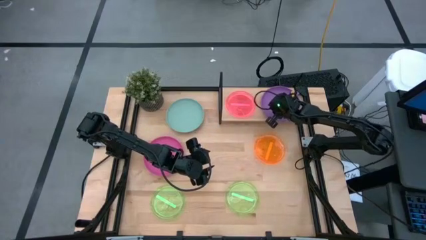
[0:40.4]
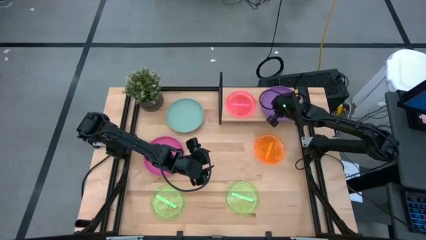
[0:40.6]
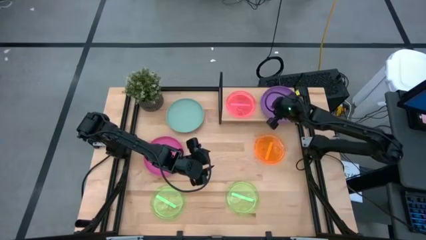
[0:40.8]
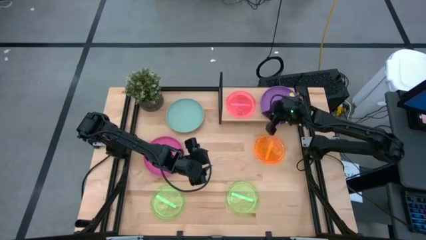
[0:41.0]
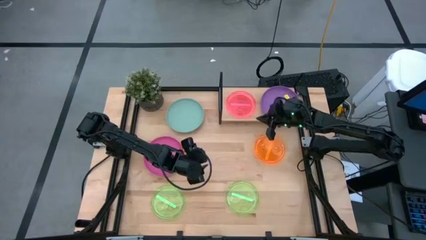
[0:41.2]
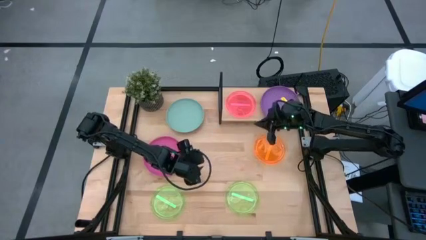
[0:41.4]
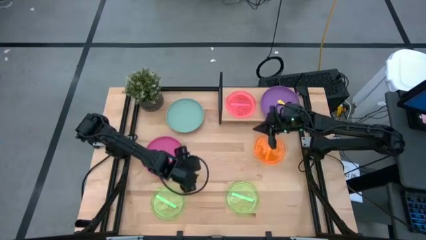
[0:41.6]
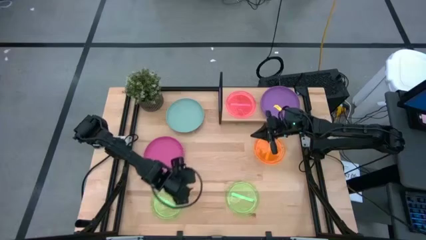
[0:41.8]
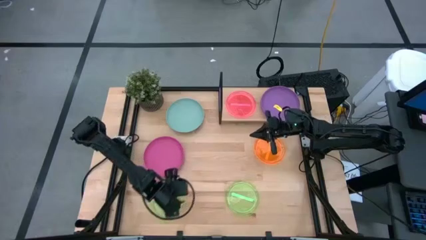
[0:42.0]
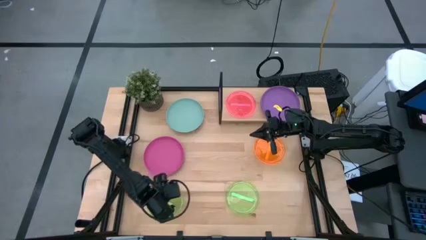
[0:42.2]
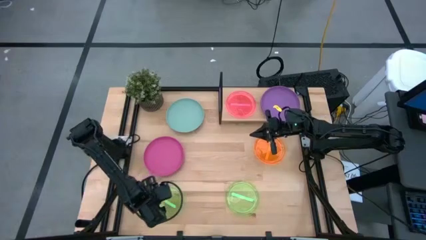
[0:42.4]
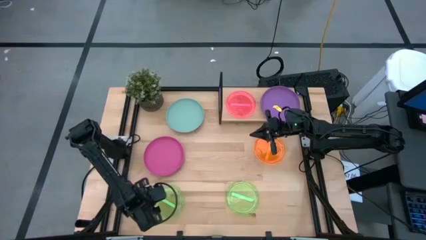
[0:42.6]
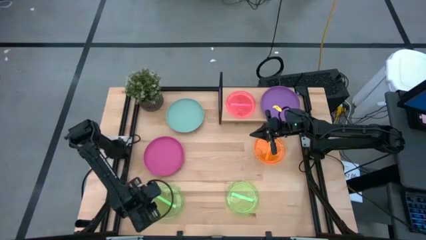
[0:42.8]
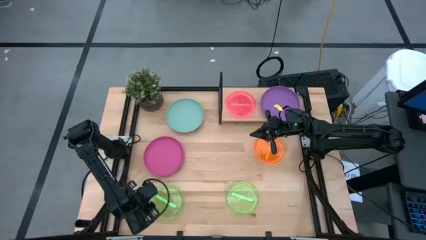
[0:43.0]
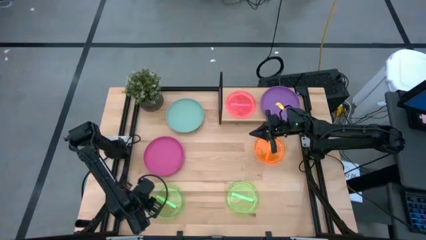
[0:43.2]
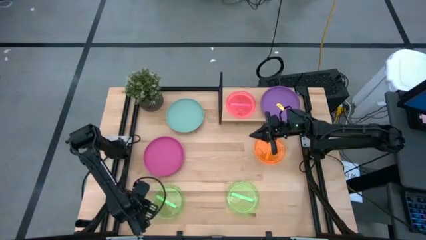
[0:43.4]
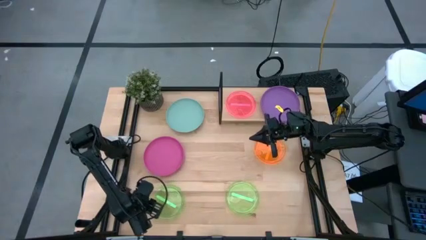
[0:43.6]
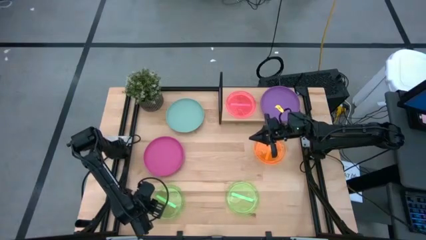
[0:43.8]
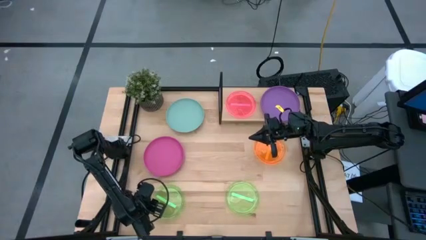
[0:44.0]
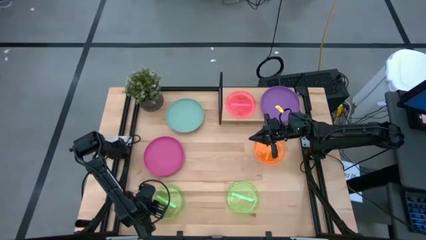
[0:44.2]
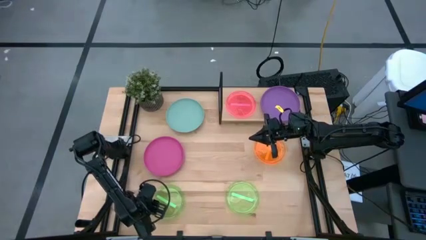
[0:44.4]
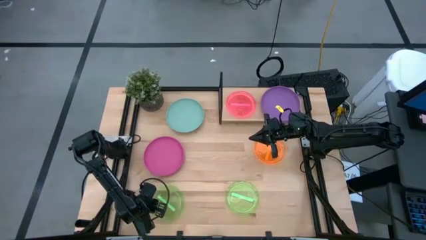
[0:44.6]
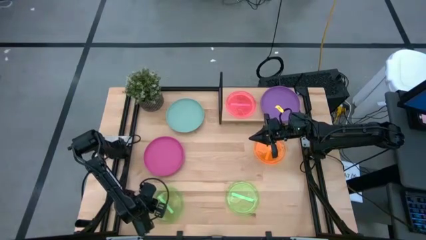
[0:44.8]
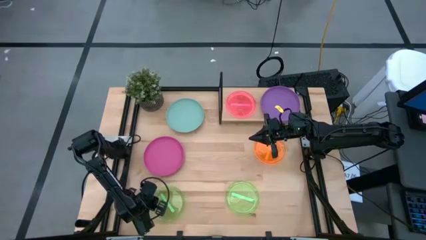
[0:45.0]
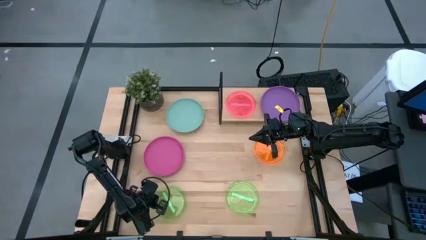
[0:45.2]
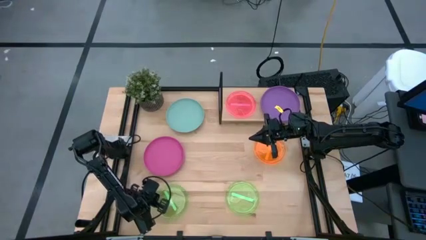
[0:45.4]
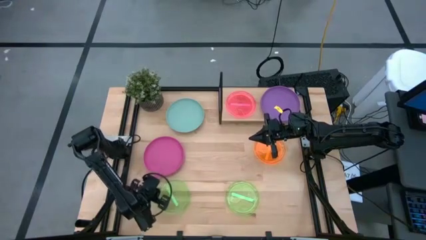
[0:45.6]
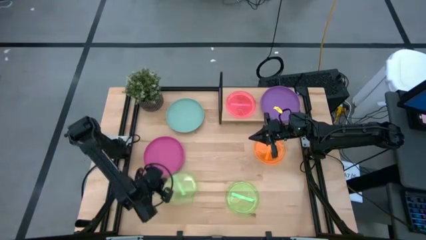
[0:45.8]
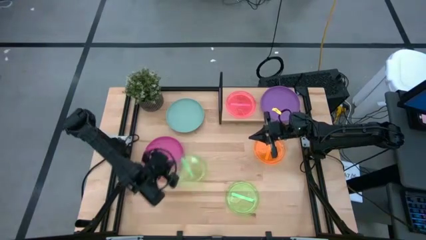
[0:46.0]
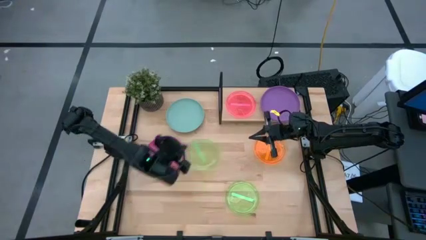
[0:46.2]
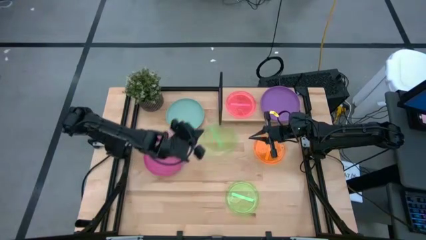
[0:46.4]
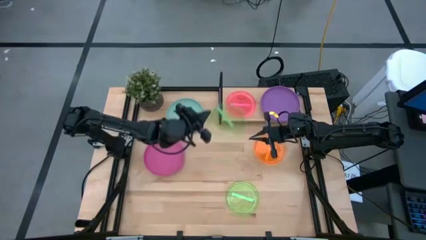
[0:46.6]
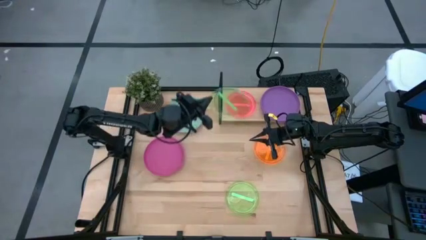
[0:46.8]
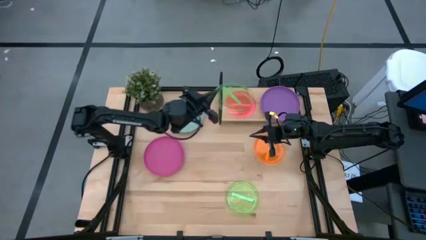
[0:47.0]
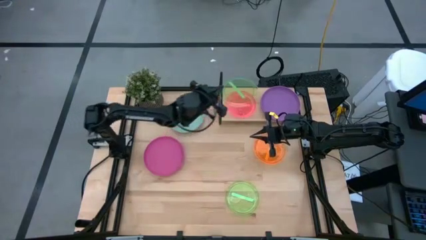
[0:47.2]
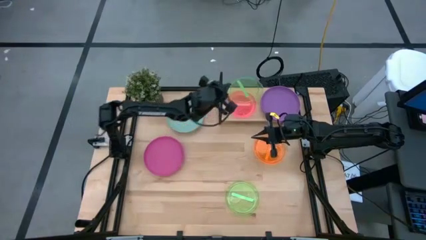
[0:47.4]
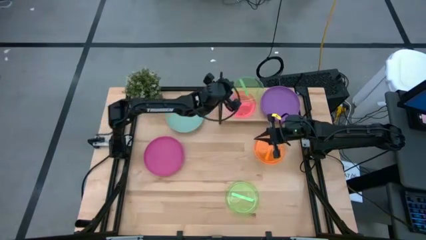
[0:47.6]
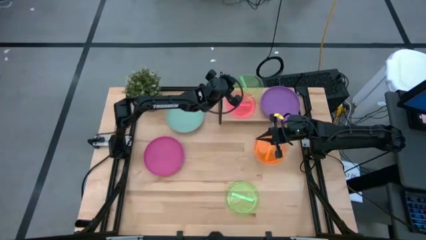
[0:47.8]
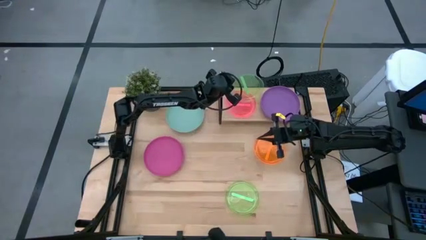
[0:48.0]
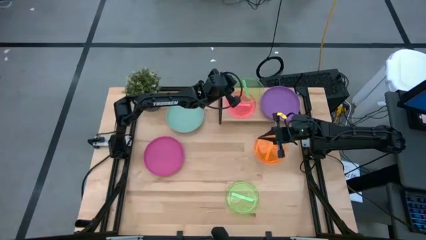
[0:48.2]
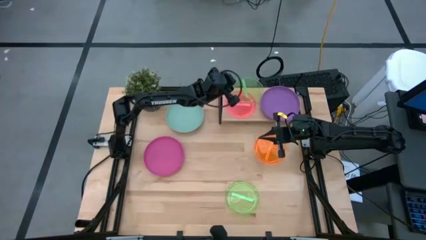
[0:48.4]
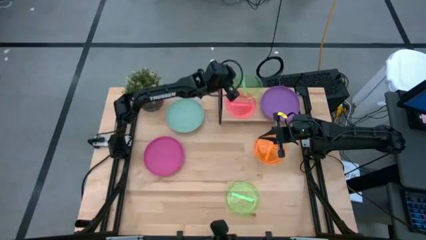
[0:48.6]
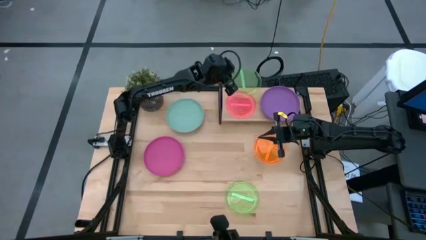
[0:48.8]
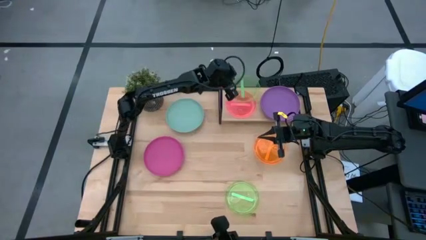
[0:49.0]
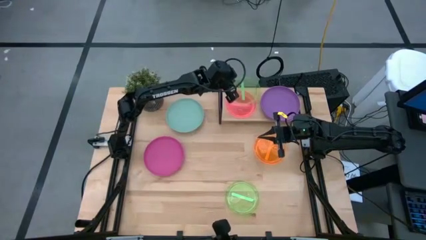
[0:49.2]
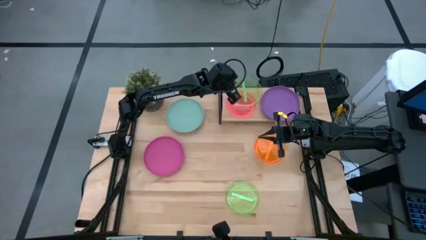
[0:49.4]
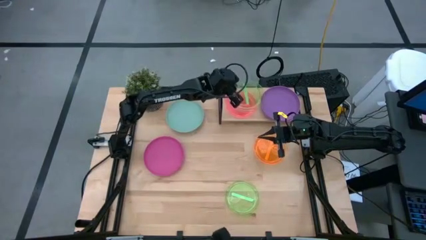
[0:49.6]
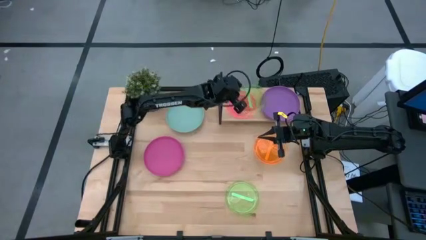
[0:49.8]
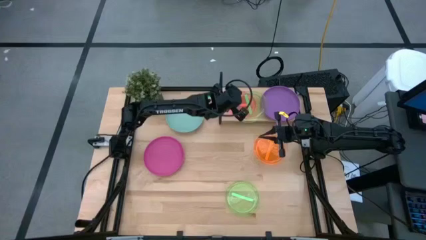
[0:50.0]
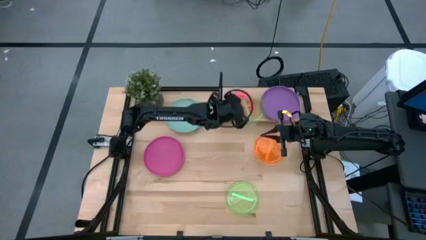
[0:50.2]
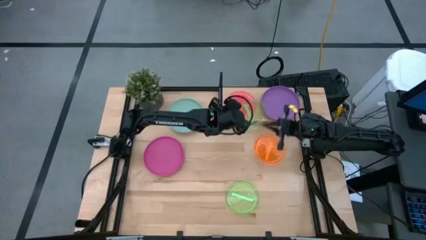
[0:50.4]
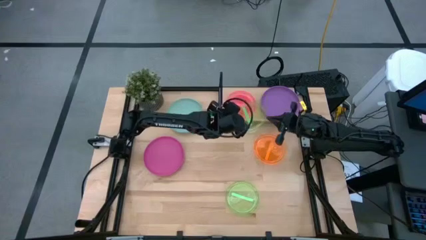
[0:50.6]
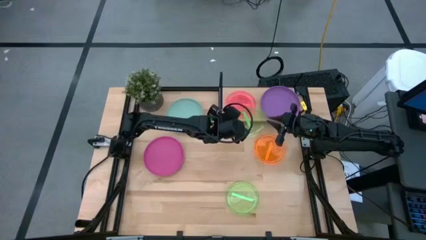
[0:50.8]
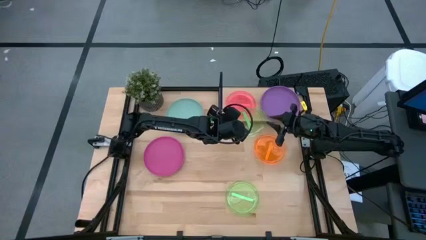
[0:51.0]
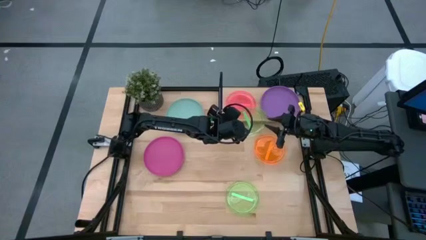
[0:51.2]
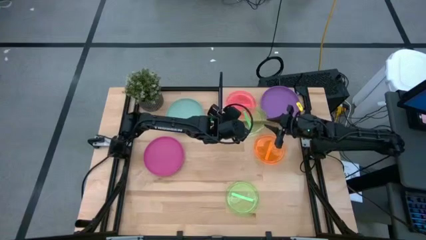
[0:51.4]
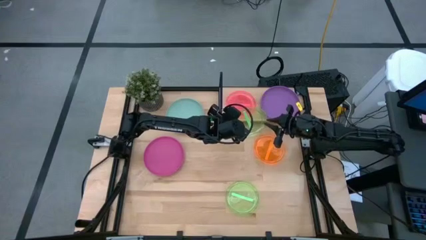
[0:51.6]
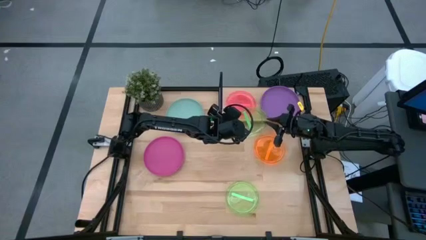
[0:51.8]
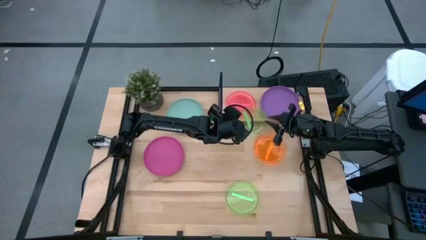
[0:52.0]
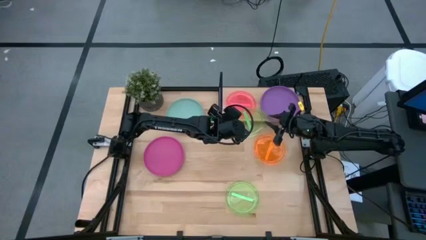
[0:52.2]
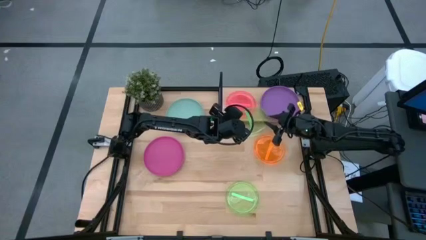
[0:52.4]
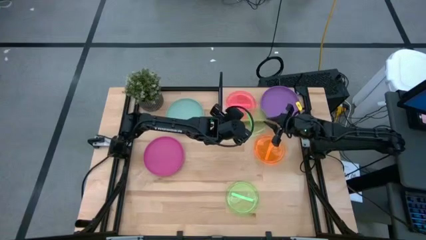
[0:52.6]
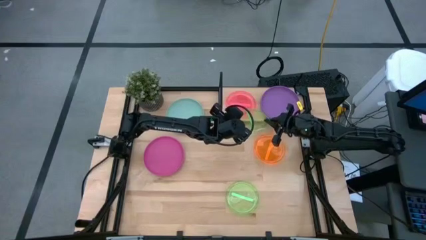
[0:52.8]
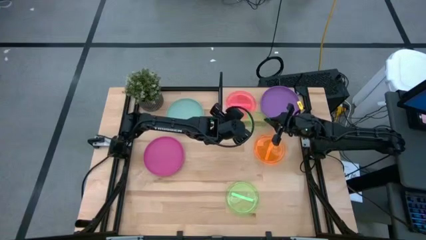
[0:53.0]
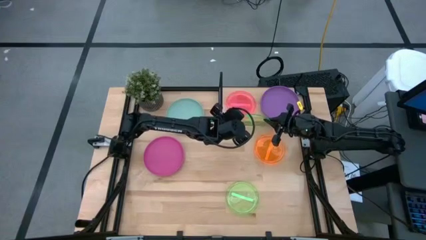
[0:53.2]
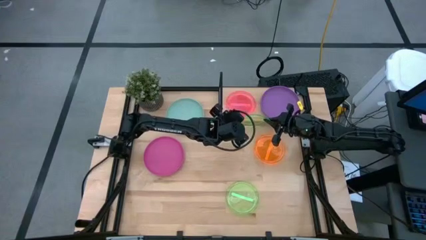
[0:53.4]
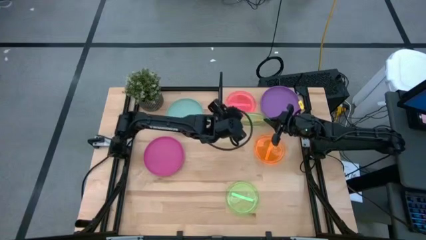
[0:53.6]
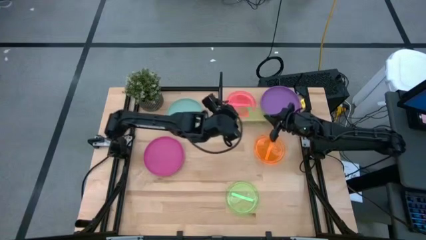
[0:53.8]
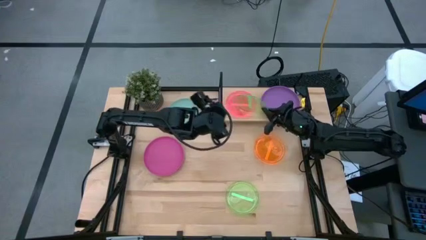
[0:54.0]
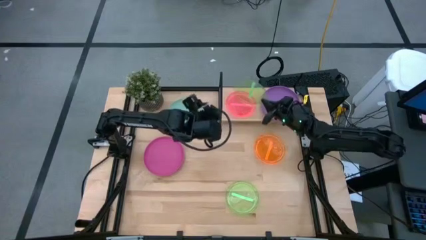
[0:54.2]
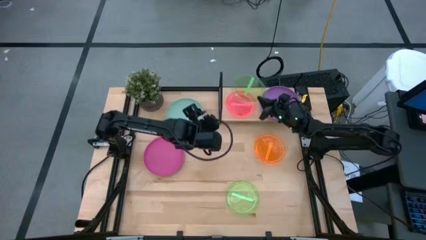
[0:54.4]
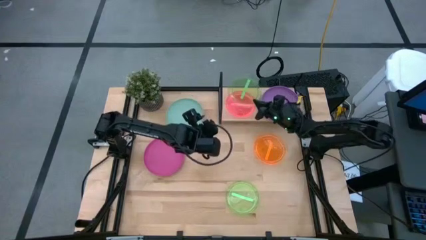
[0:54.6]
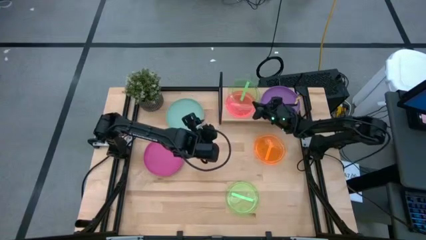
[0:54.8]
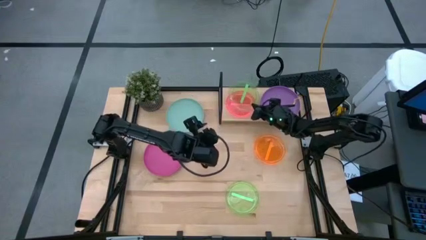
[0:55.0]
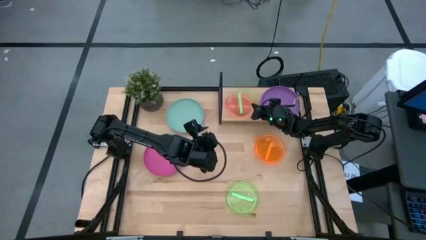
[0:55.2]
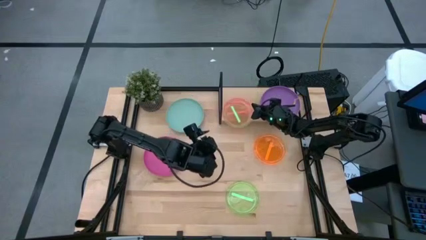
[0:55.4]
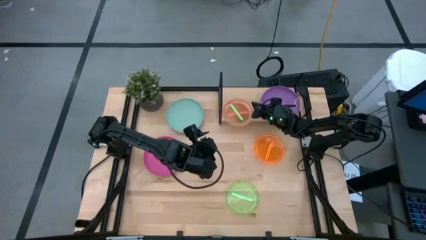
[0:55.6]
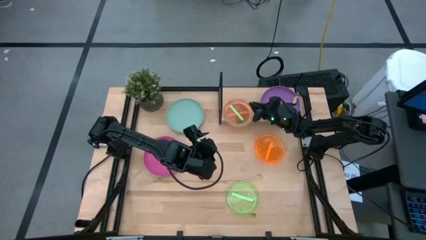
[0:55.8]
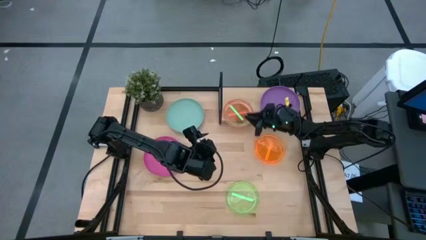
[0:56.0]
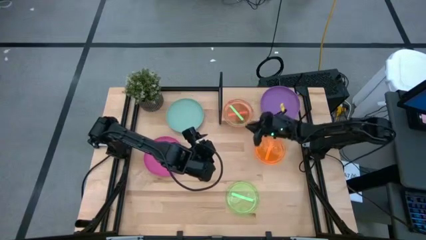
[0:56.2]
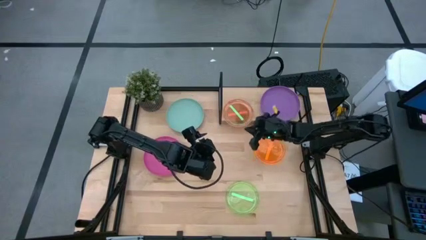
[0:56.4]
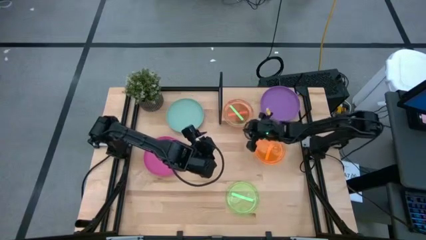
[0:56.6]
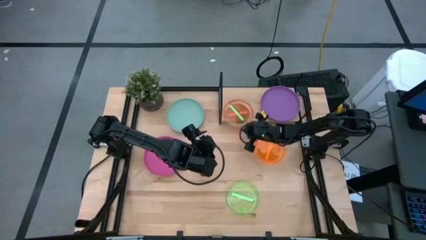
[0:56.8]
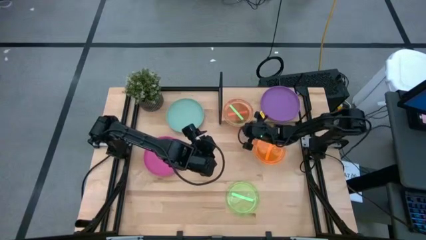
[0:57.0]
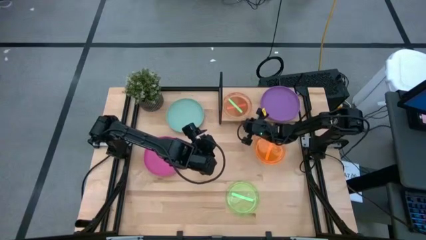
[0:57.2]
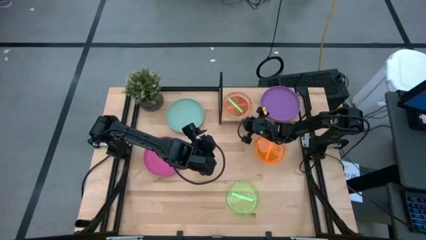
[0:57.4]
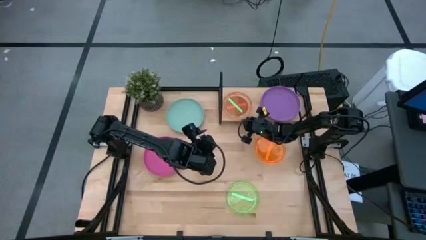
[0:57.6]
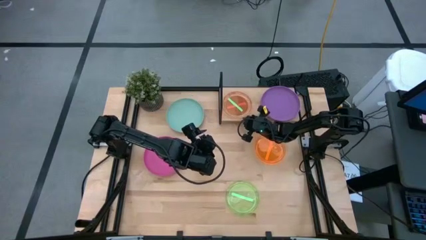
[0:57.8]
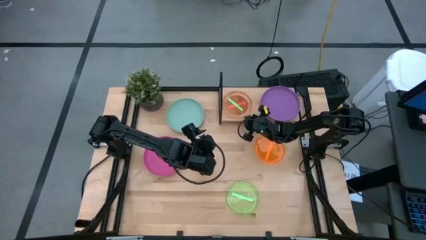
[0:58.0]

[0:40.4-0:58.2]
Task: Place and stack plates onto a shelf
Stack the left small green plate on top of the small pink plate
